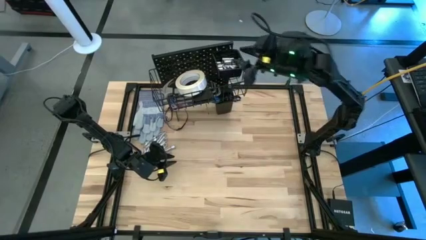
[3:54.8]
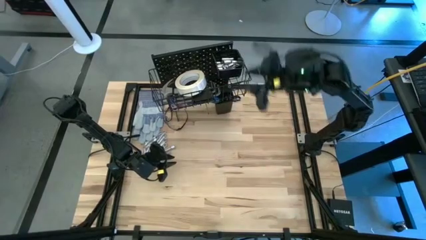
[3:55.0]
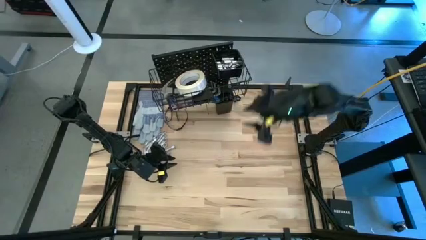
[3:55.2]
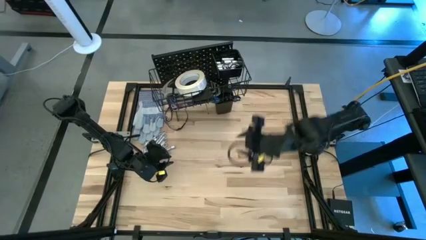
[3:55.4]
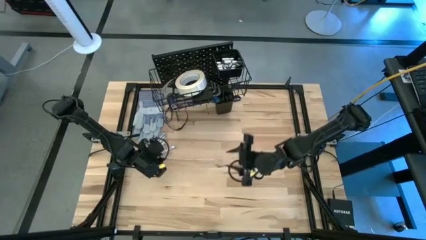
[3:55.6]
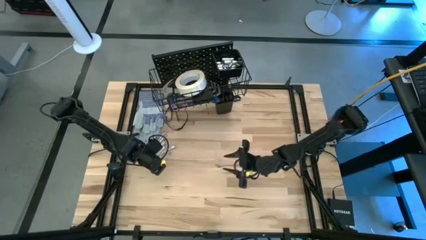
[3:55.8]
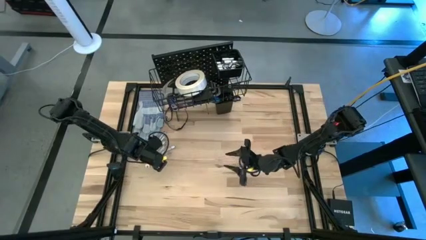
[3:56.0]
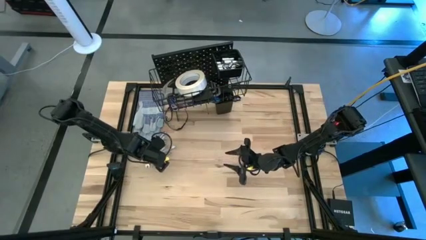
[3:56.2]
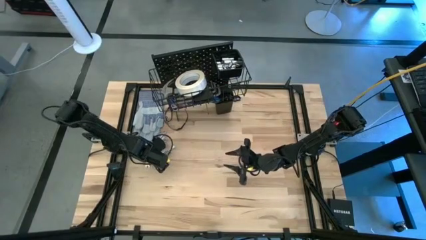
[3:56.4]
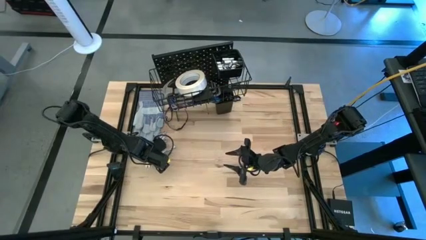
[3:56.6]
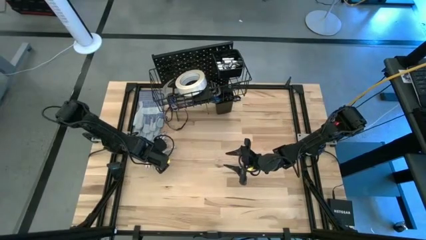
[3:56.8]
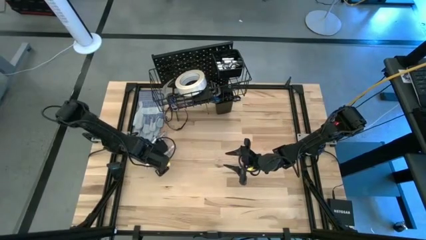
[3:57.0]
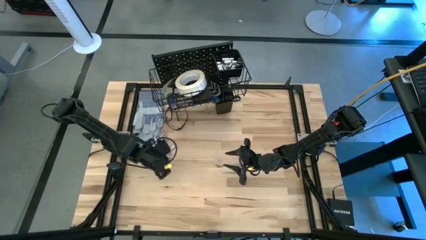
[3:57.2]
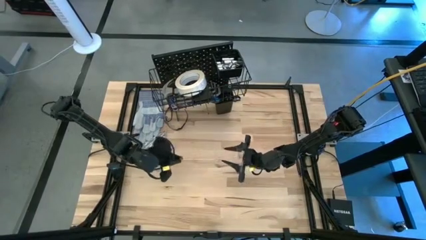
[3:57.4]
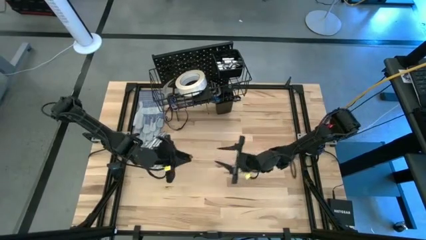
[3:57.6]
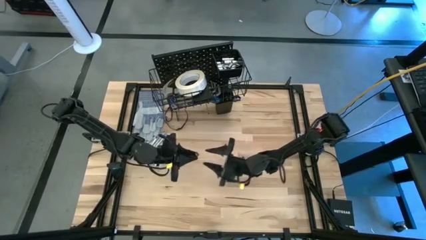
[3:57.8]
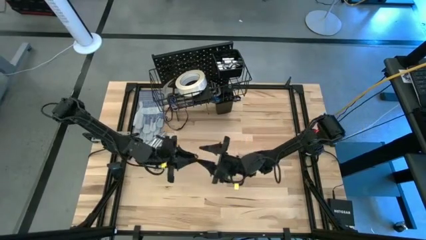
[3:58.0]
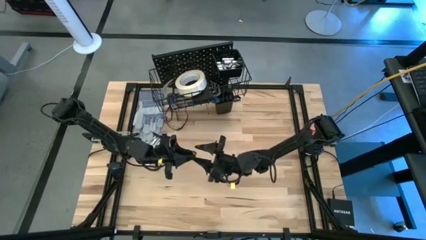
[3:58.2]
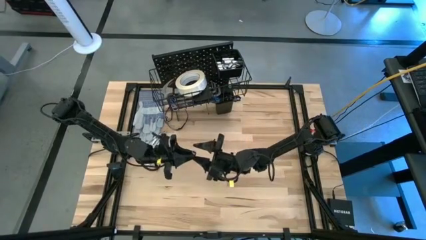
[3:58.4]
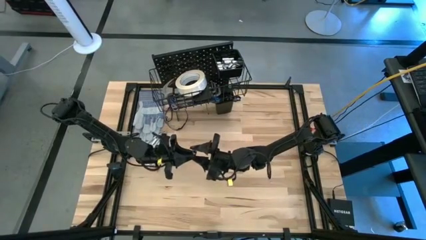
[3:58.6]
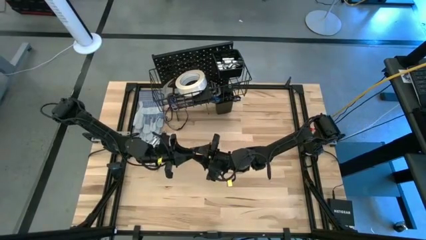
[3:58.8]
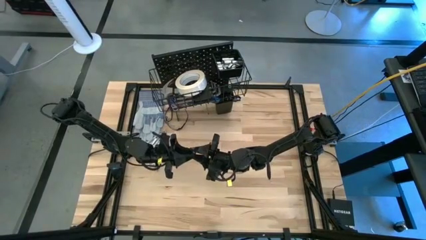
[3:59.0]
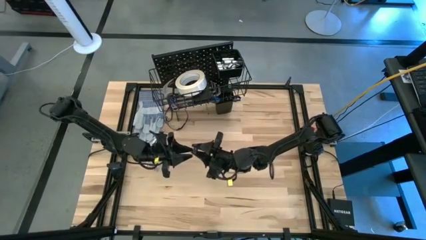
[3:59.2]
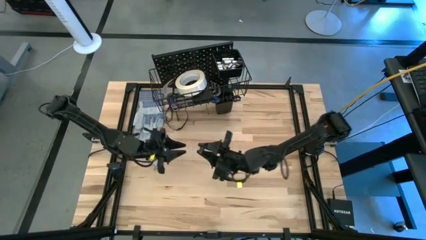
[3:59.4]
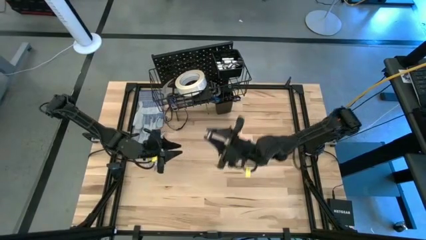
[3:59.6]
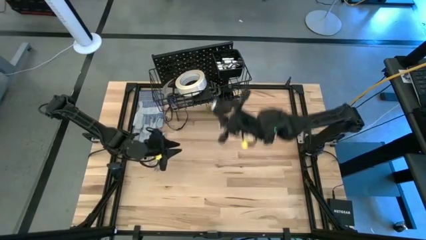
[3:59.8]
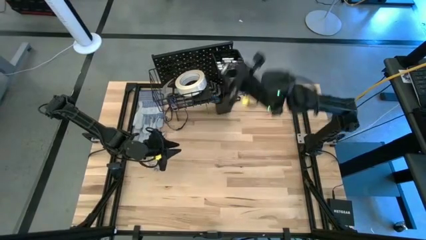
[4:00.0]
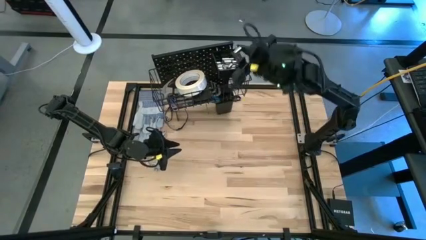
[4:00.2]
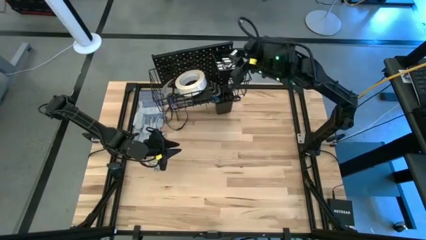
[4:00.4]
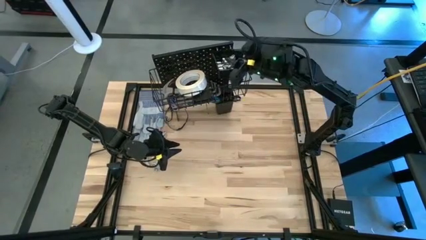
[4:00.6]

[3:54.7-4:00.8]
Task: Hang tools onto peg board
Put the socket into the top black bin on the pegboard

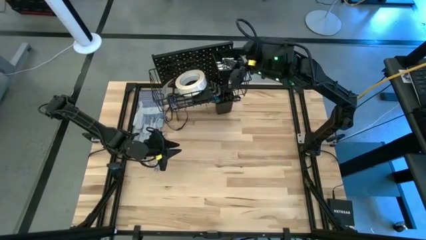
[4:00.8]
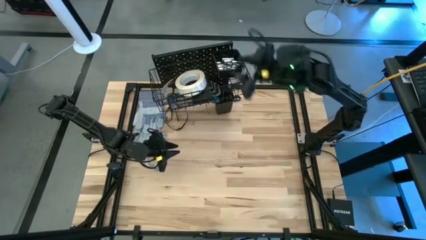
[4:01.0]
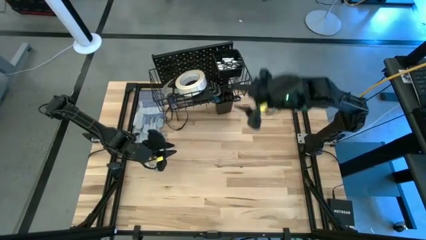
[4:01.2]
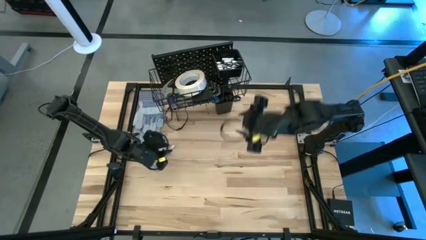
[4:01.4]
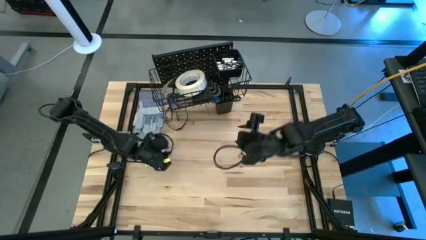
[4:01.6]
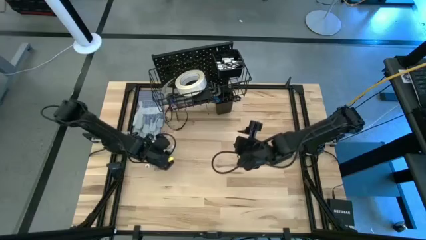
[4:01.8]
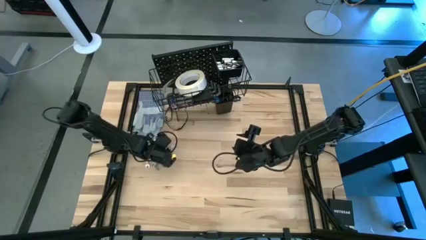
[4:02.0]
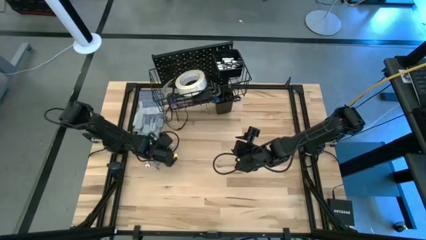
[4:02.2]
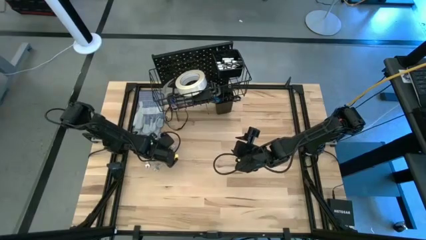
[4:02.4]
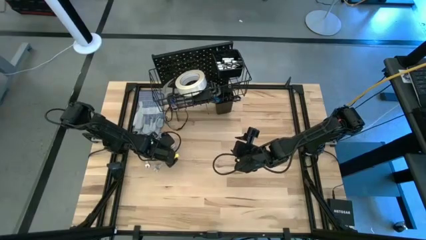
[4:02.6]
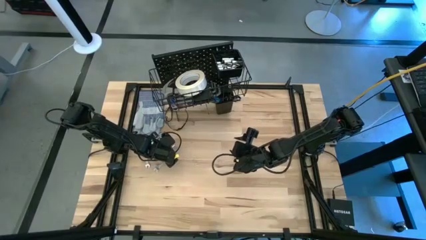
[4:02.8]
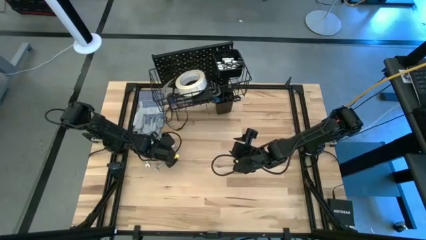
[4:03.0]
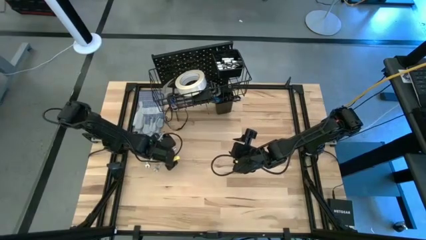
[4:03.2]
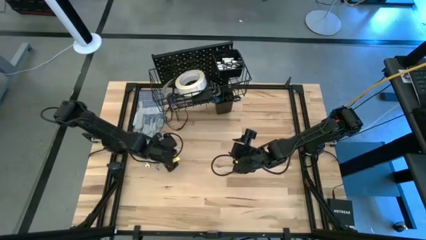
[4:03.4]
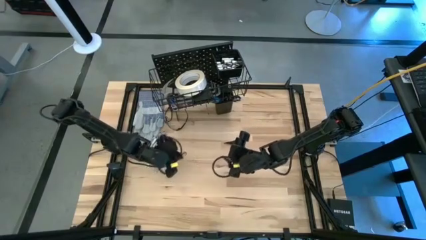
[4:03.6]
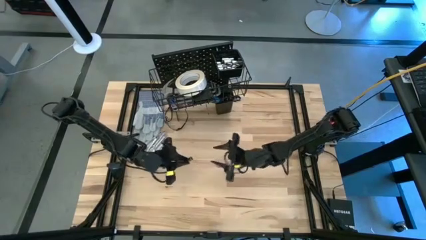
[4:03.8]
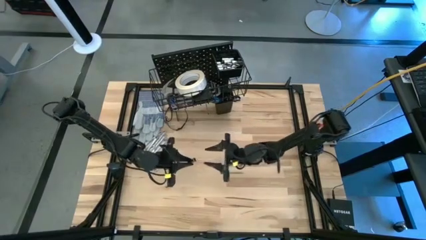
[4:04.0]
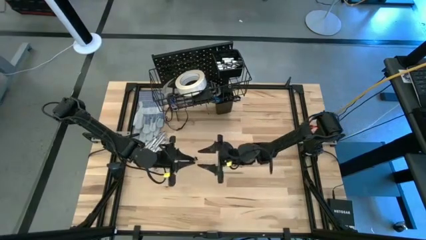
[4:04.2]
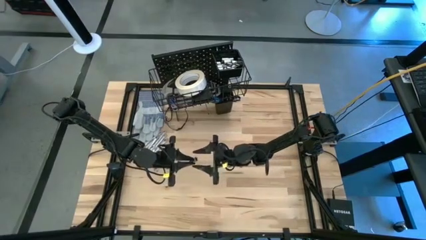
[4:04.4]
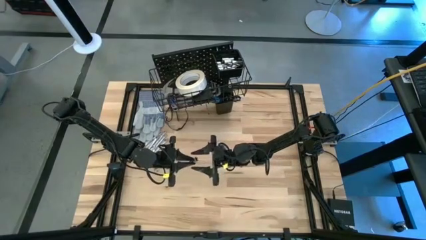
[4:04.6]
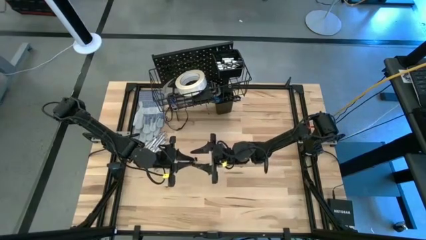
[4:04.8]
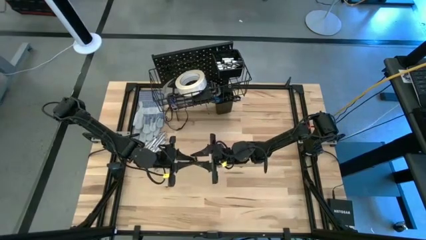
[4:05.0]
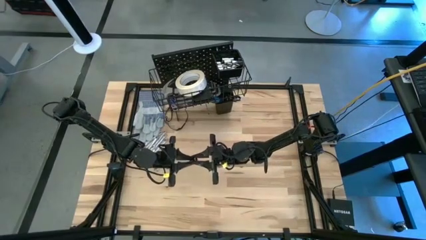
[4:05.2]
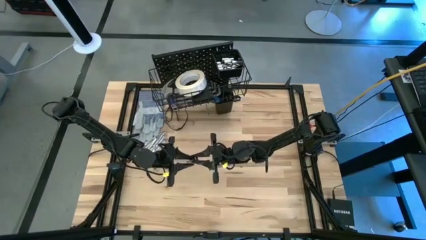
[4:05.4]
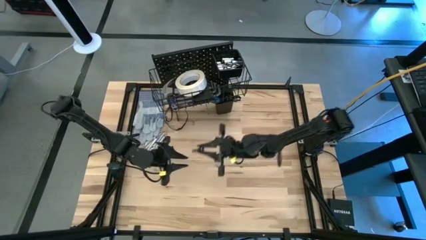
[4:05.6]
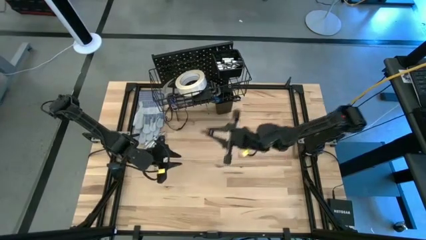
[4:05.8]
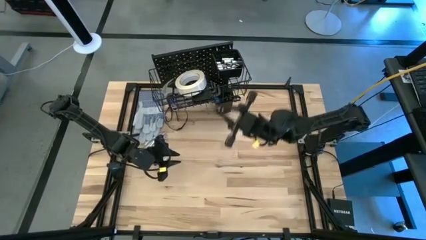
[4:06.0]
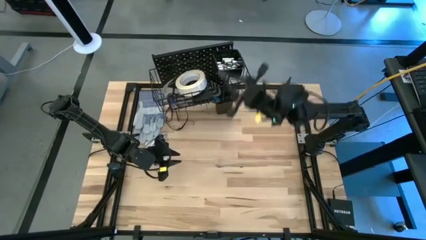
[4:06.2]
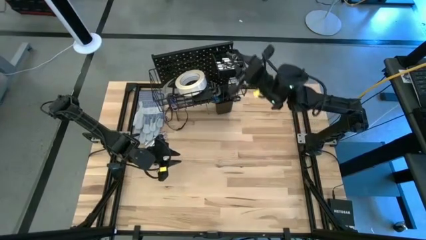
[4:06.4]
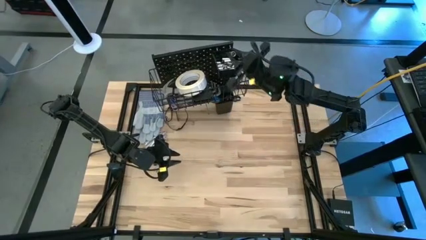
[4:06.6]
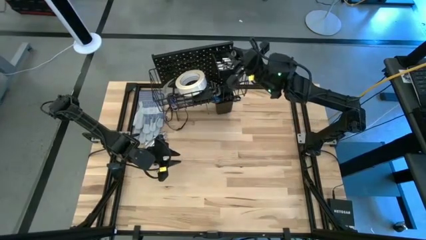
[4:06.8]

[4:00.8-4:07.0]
Put the extension bar into the top black bin on the pegboard

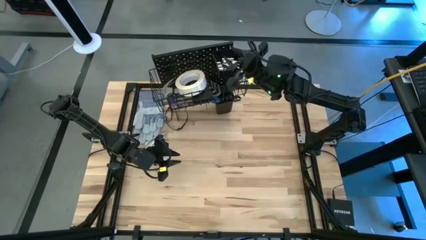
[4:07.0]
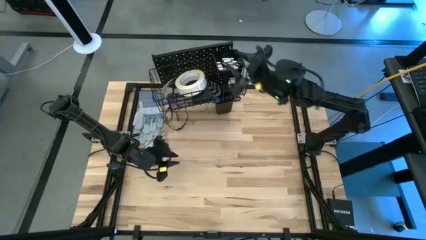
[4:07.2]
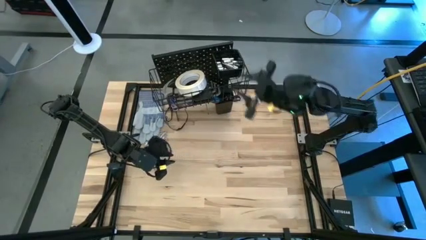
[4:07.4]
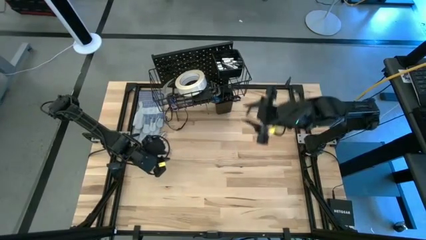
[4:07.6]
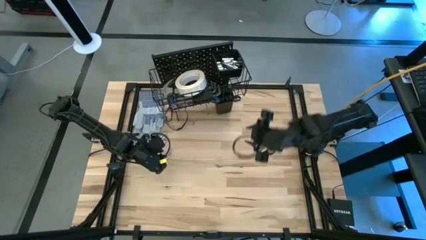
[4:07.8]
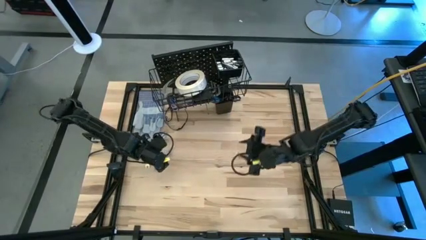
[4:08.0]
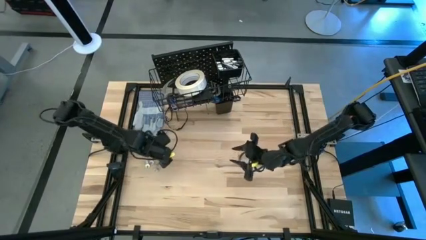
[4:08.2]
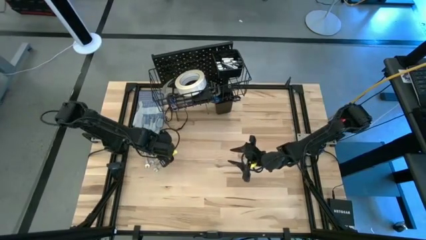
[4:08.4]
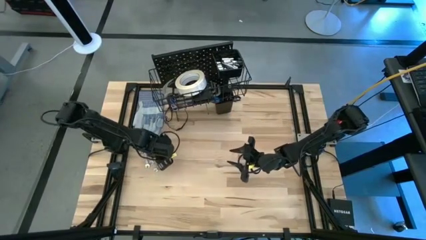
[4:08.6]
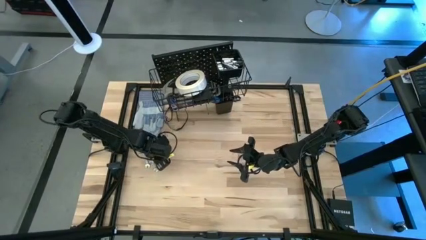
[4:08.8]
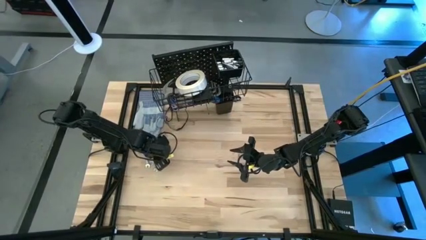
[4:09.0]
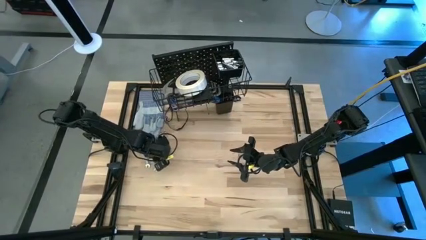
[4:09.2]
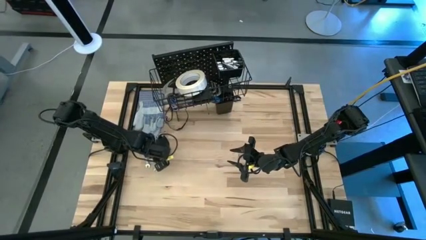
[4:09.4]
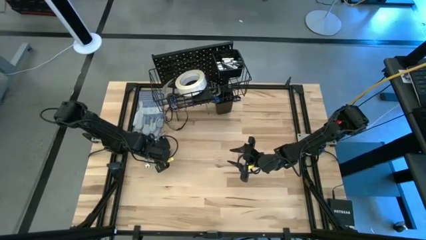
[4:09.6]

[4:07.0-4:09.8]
Hang the wrench on the pegboard

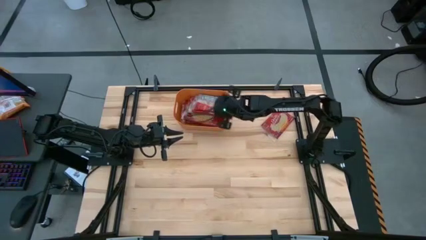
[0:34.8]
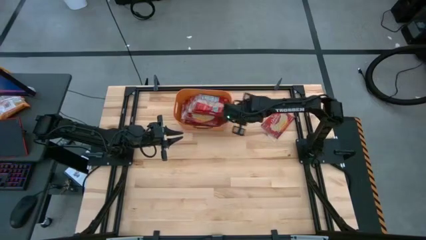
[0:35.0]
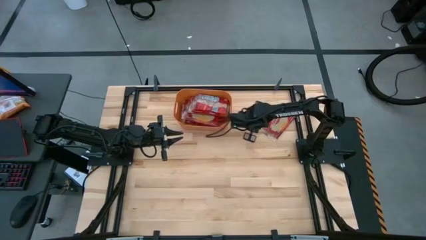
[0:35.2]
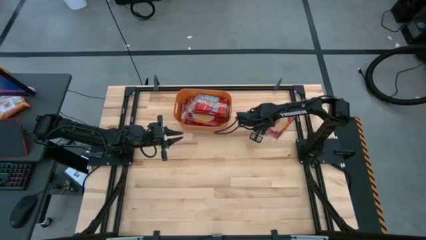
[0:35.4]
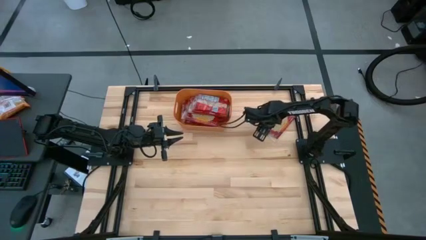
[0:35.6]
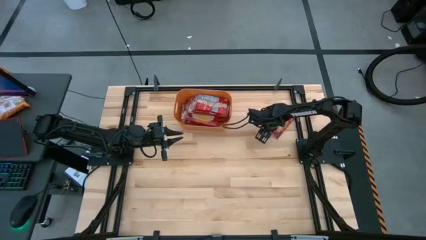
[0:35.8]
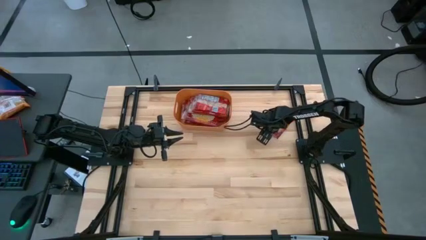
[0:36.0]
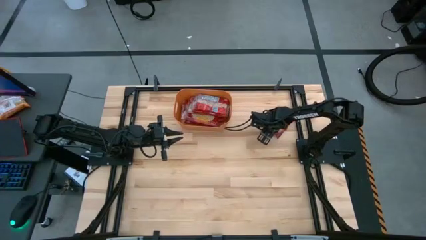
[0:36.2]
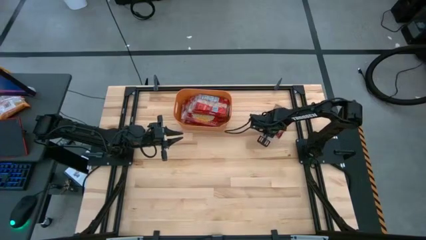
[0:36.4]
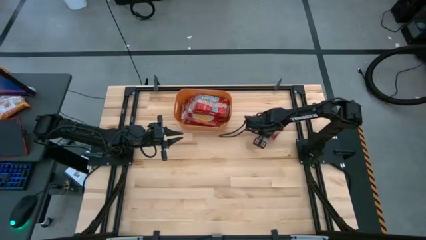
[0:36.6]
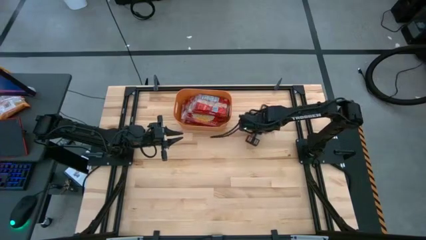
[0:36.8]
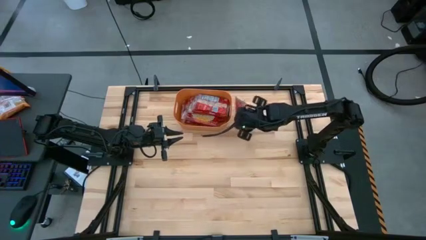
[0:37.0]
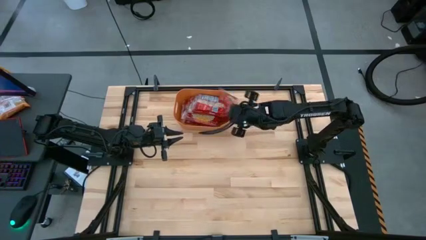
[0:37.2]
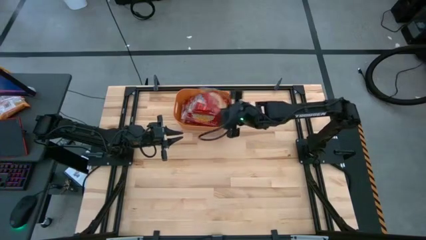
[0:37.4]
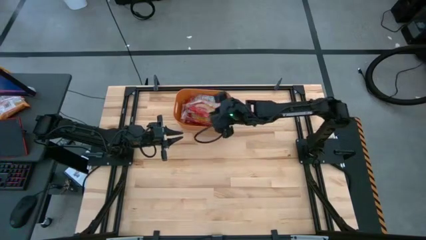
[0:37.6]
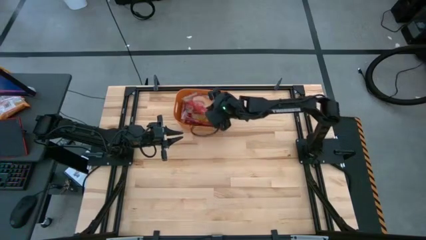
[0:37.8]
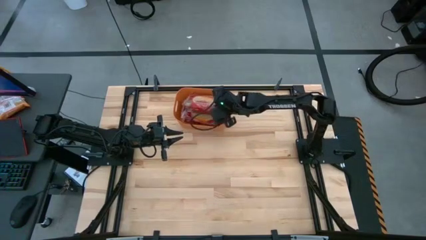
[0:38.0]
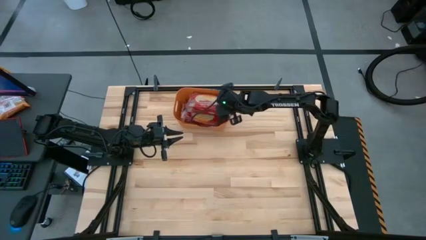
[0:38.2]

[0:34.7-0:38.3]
Task: Sort popcorn bags into baskets
Put the red popcorn bag into the orange bin
